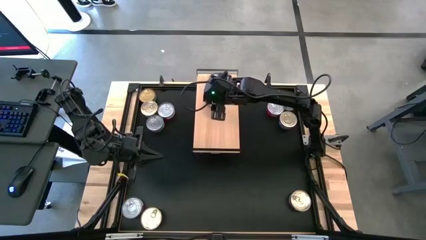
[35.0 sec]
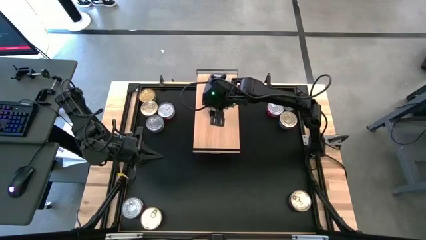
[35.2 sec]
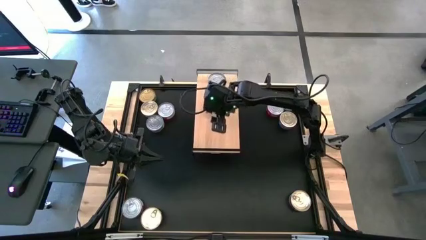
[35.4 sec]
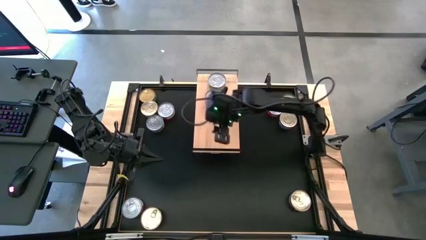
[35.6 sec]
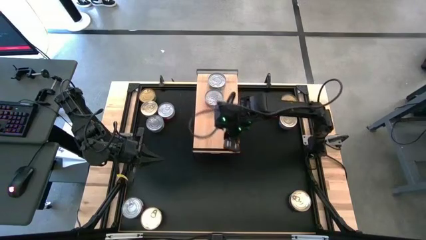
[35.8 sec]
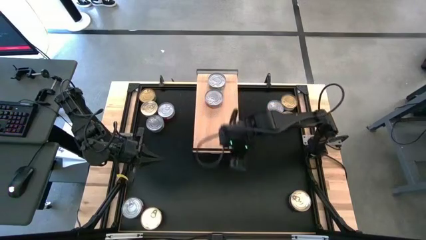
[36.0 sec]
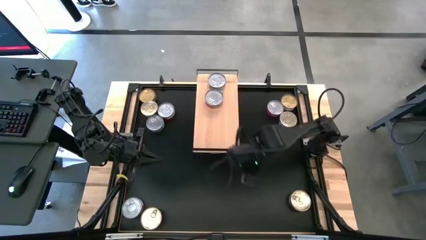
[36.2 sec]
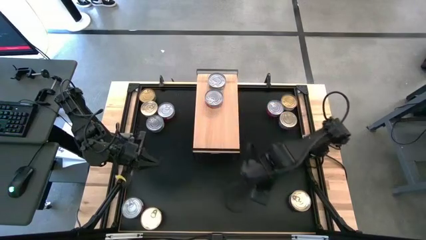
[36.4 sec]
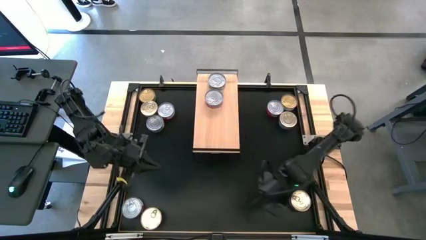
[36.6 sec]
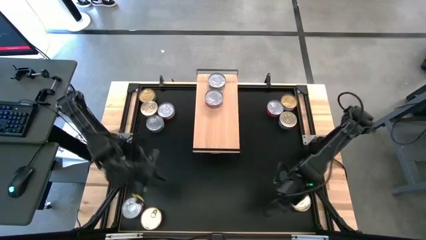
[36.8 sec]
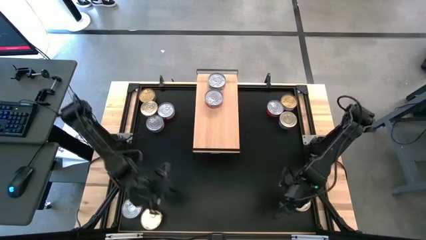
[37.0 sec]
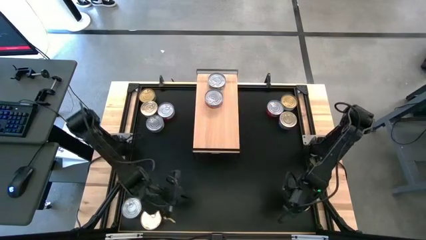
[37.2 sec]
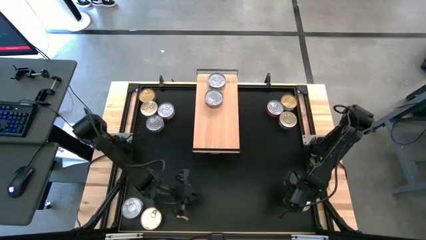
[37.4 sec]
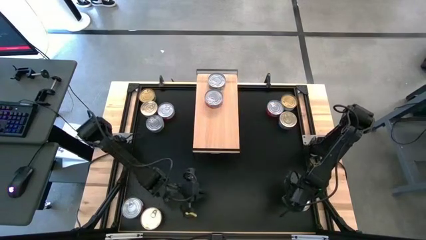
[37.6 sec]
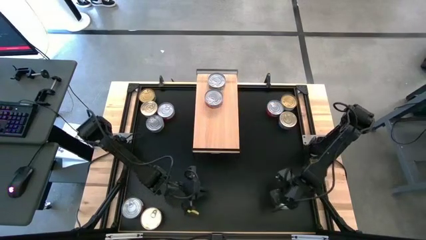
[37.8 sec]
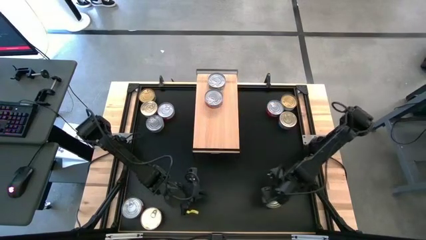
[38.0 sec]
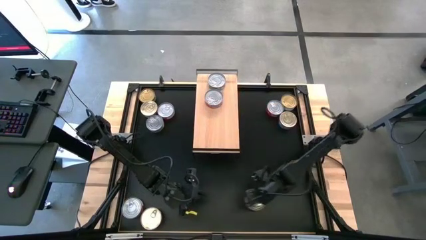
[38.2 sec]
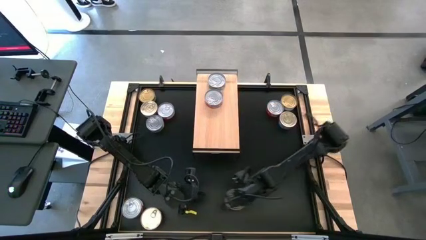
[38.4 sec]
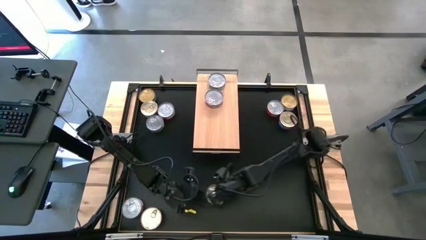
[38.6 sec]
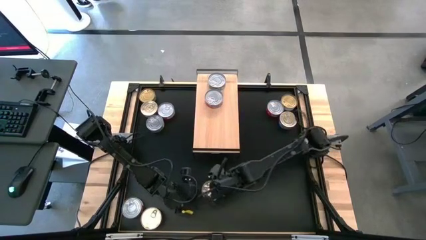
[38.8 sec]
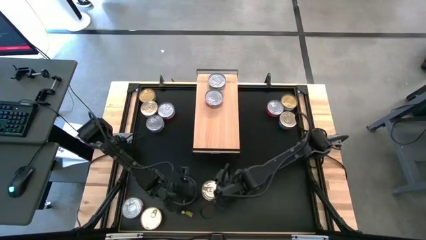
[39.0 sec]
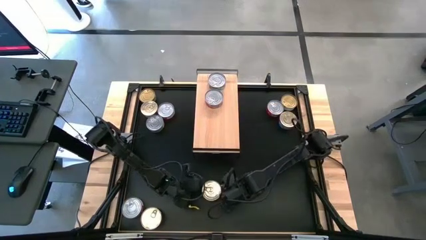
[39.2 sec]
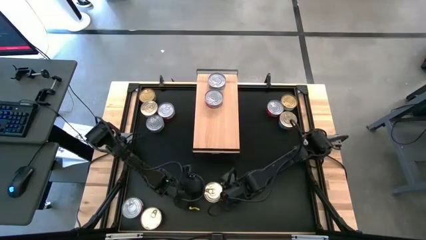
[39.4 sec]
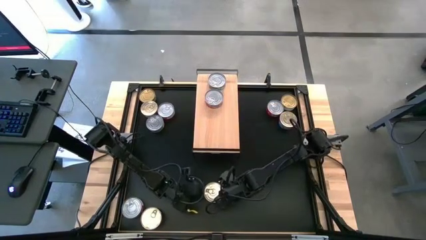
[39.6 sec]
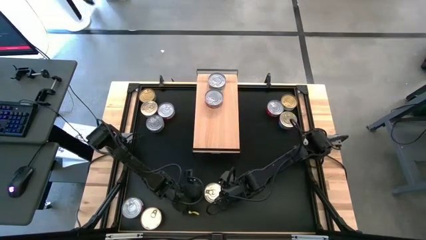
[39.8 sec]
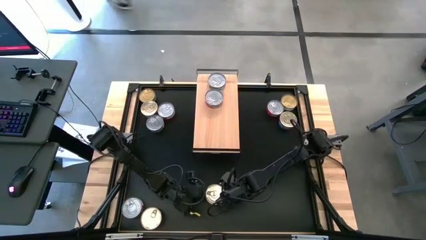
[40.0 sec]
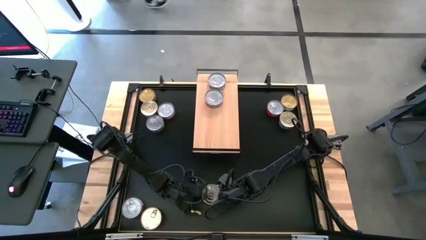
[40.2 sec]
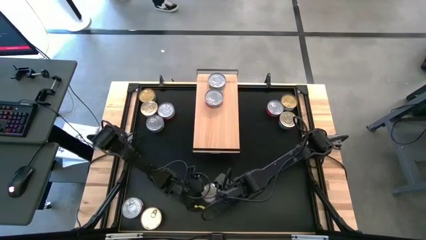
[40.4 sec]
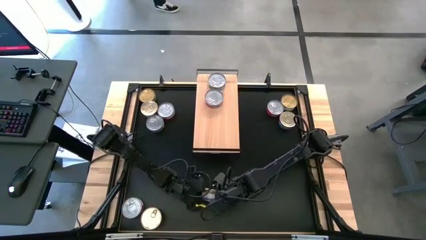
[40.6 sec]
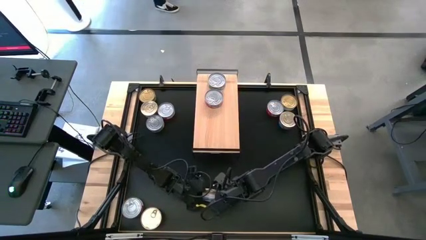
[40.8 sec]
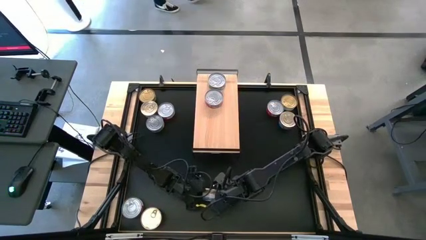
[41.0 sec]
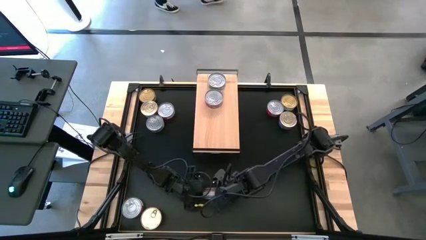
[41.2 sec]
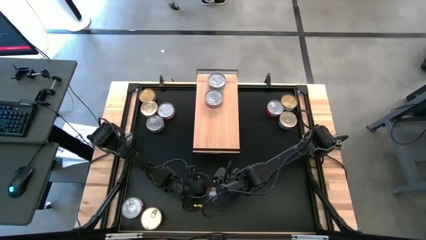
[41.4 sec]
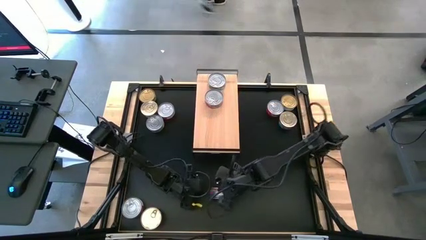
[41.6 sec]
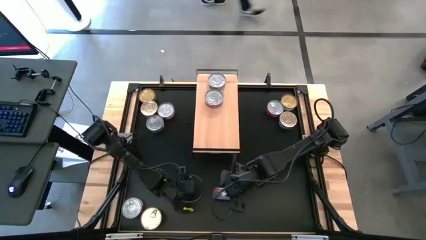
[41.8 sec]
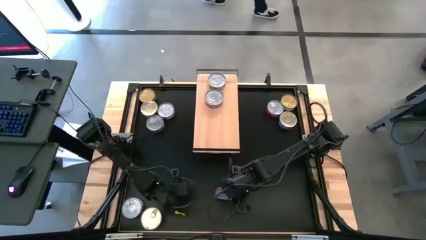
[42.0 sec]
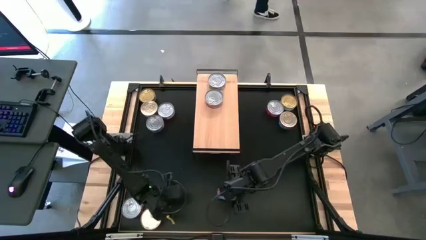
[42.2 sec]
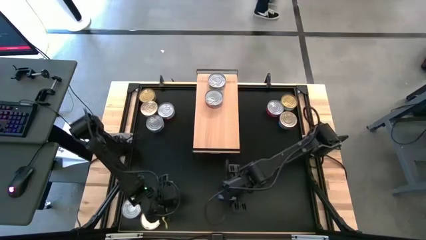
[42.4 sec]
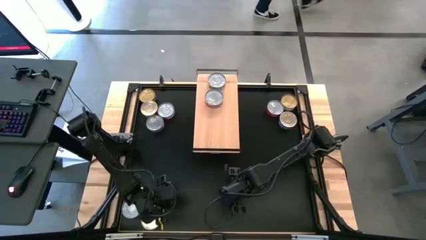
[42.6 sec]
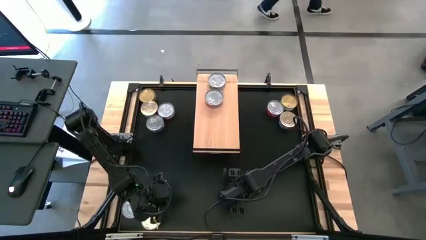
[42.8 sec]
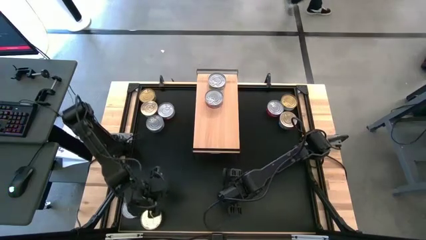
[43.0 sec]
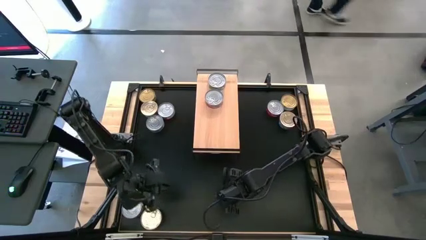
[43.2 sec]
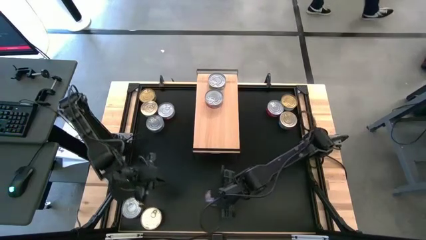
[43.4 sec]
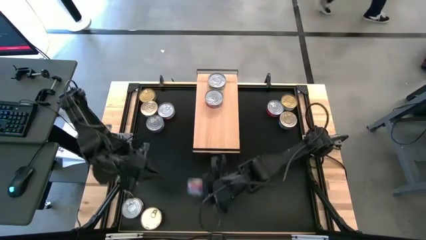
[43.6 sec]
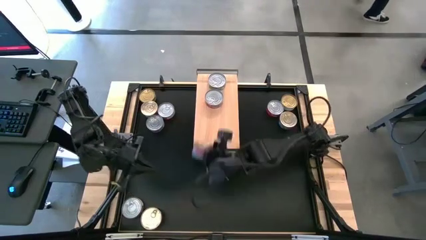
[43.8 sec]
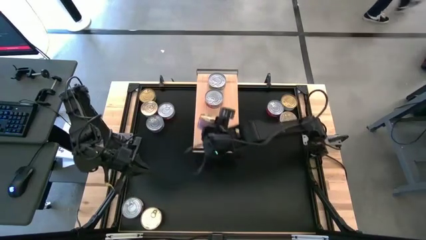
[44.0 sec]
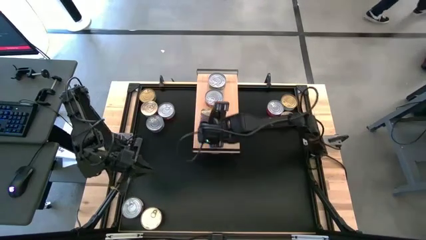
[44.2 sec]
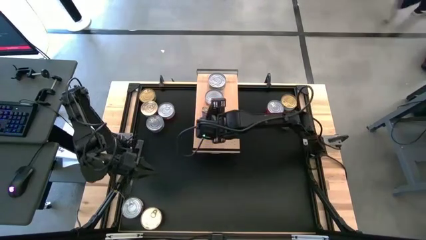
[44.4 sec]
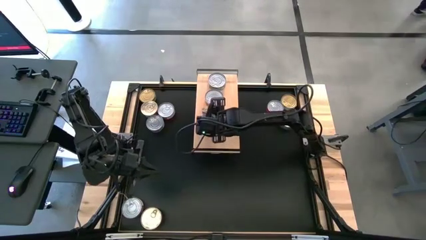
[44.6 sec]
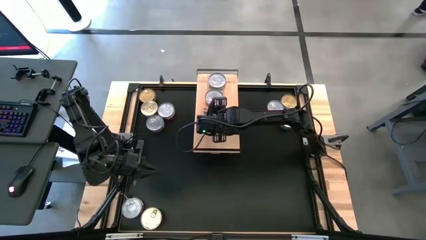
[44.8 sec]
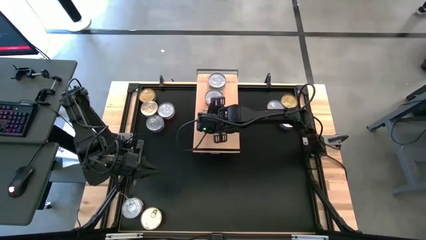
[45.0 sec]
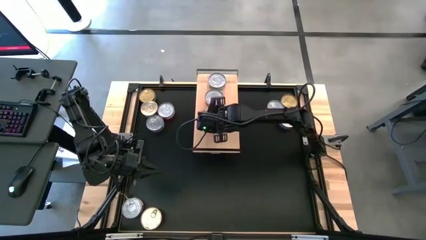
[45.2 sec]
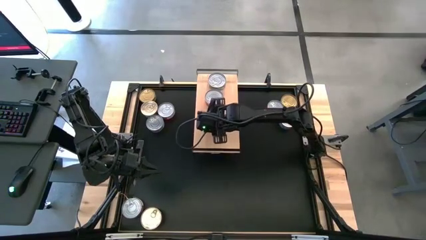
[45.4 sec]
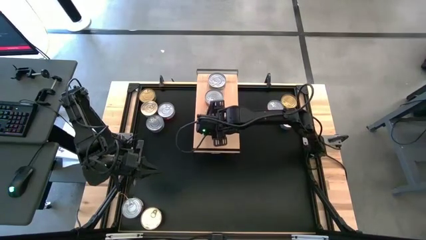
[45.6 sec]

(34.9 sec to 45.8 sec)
Task: Stack canned seafood by type on shelf
Put the blue pink tuna can on the shelf

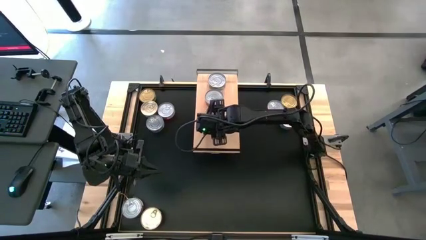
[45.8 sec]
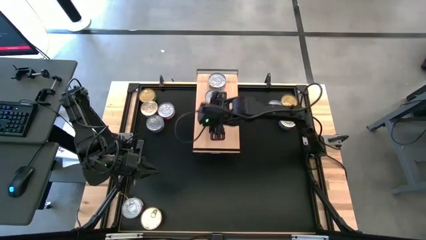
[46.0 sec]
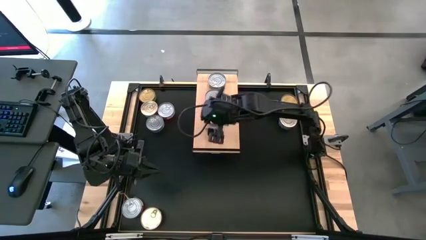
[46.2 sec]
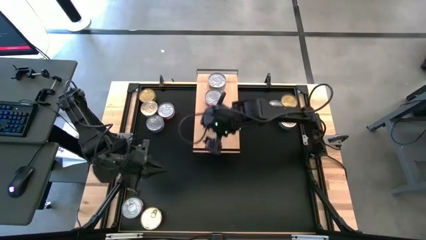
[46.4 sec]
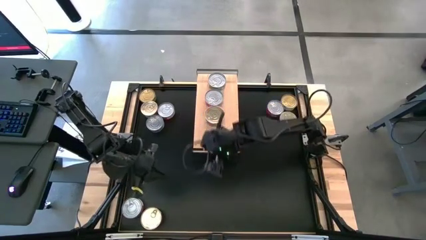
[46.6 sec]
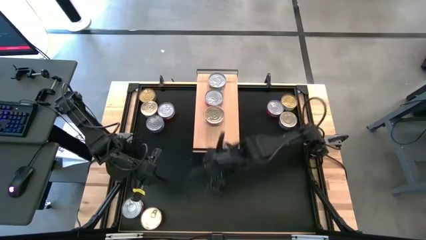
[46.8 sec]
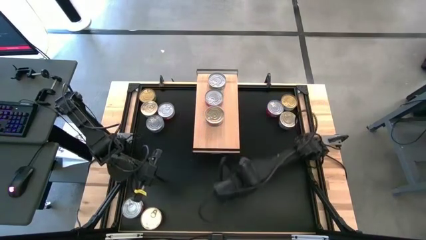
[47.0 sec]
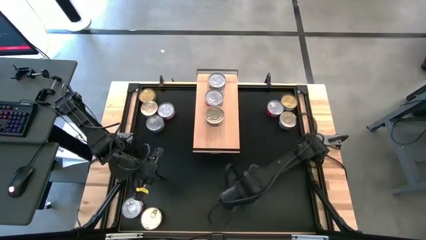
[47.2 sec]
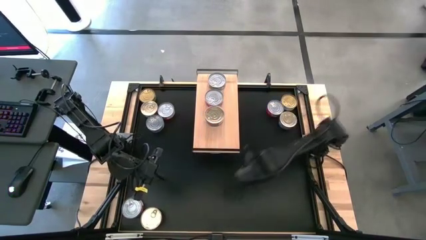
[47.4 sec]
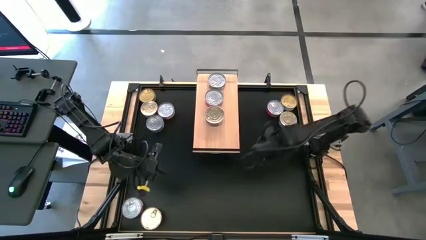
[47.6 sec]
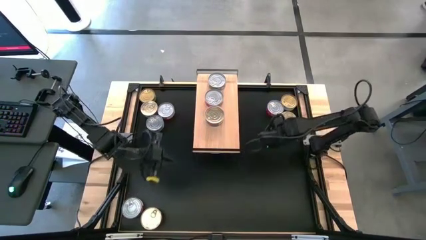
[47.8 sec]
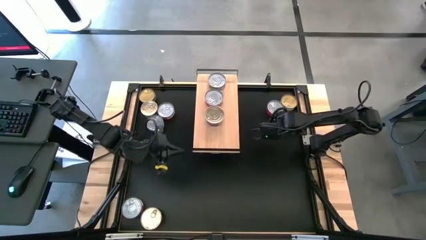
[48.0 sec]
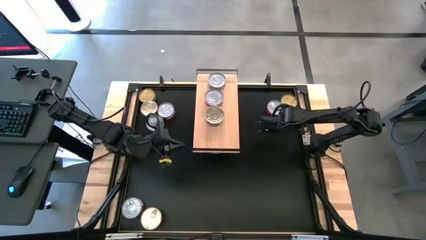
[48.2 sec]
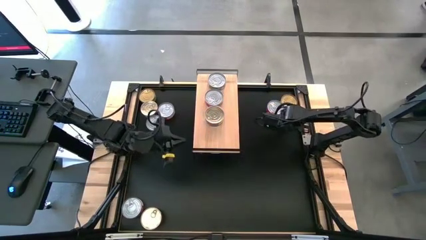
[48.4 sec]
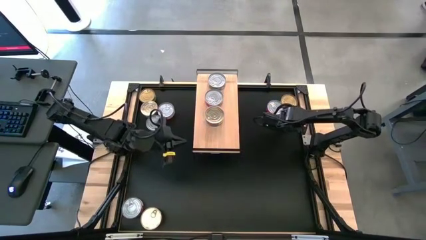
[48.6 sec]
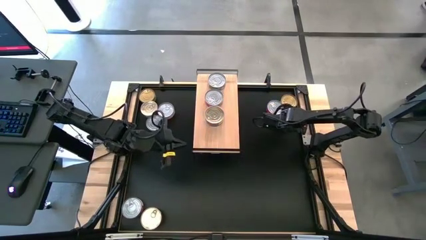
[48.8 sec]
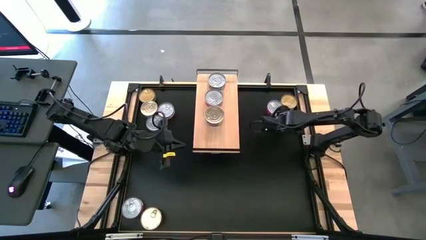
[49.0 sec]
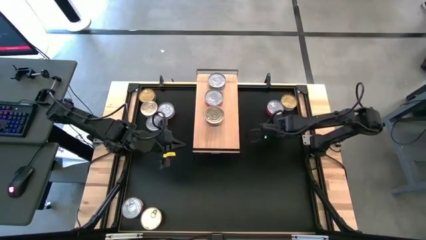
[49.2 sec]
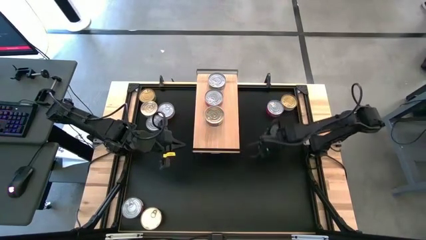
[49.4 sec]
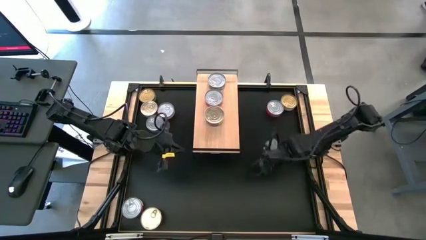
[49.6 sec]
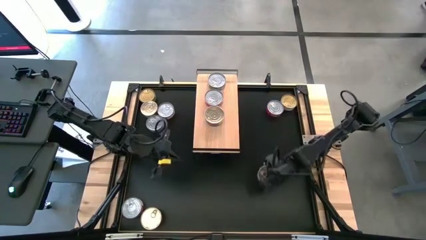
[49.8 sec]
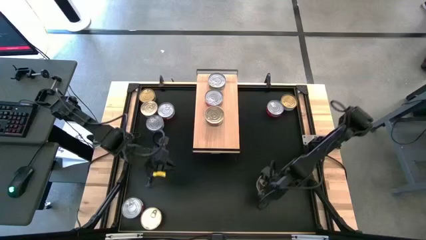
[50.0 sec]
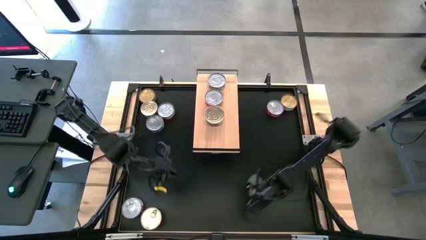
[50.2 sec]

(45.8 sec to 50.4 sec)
Stack the blue pink tuna can on top of the blue pink tuna can on the shelf
